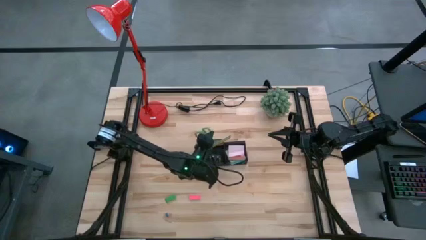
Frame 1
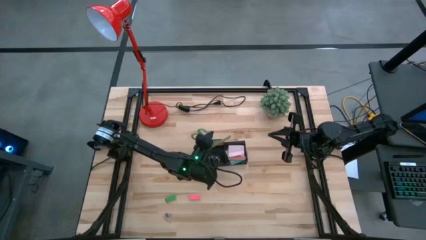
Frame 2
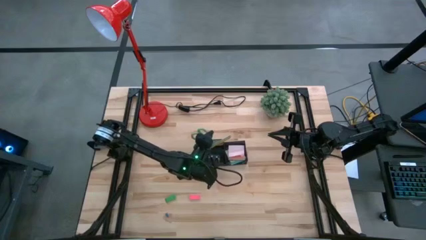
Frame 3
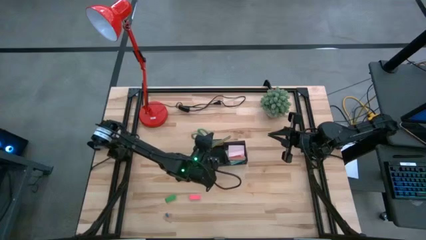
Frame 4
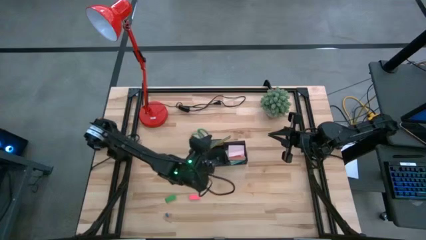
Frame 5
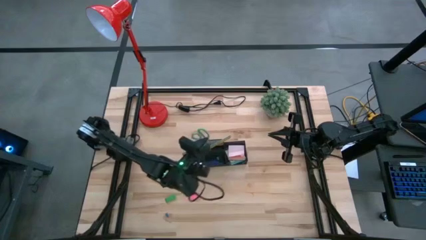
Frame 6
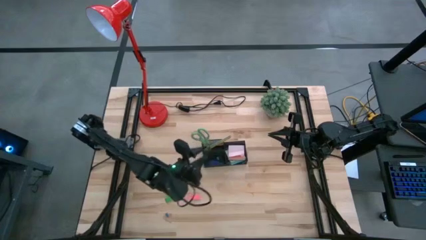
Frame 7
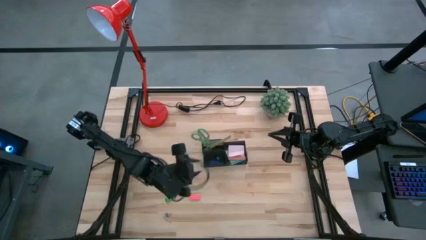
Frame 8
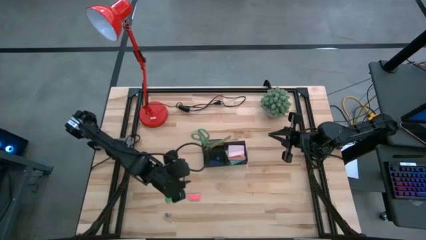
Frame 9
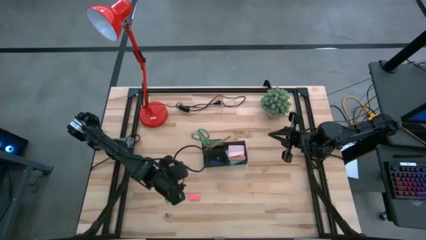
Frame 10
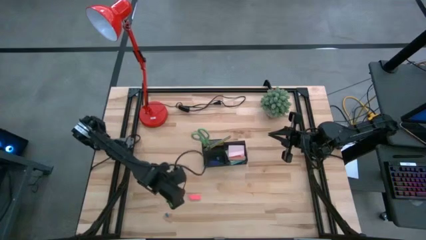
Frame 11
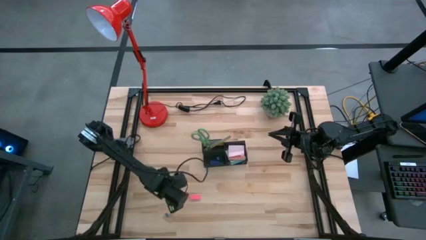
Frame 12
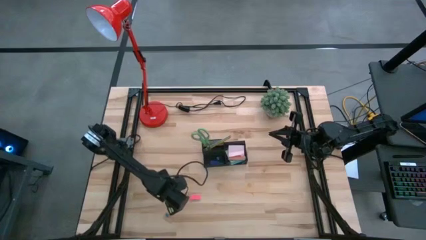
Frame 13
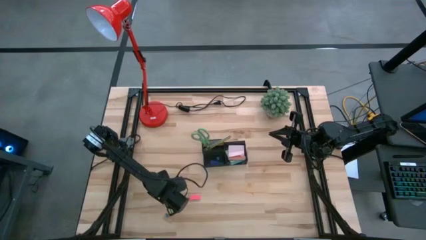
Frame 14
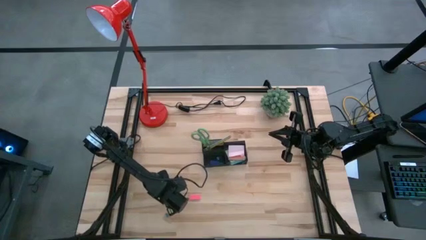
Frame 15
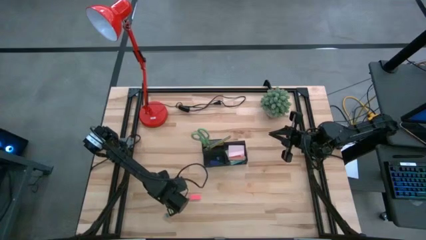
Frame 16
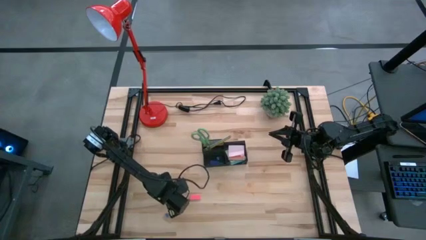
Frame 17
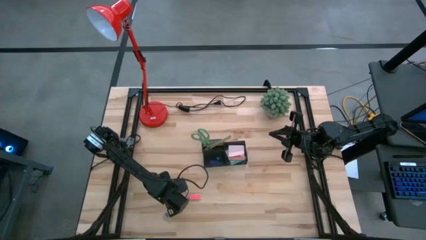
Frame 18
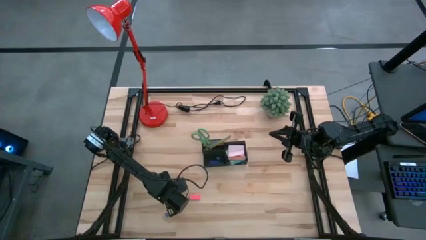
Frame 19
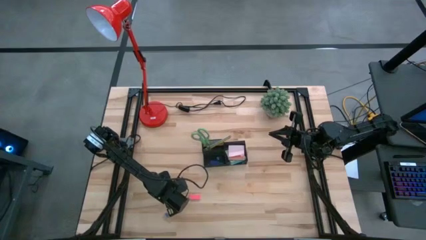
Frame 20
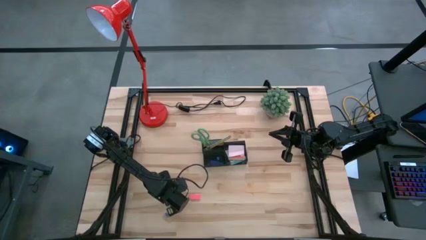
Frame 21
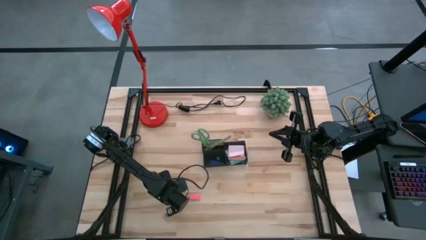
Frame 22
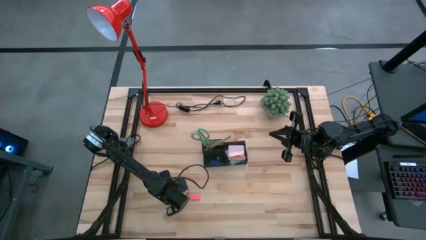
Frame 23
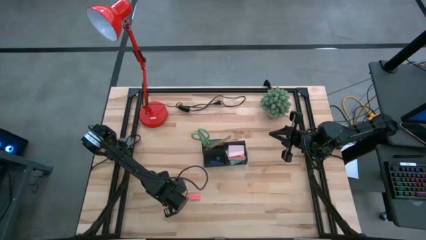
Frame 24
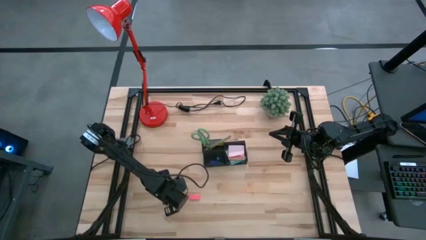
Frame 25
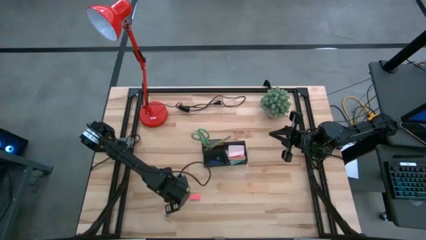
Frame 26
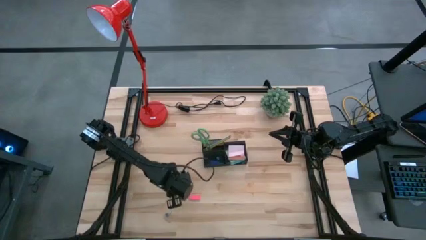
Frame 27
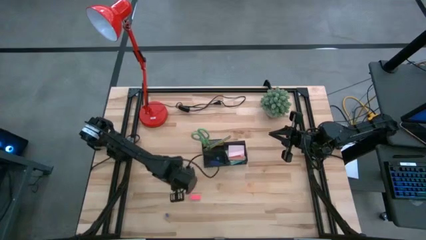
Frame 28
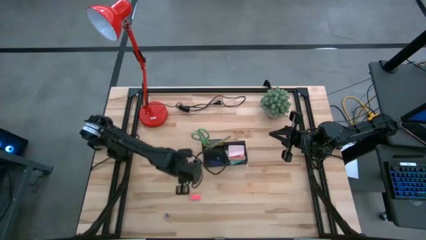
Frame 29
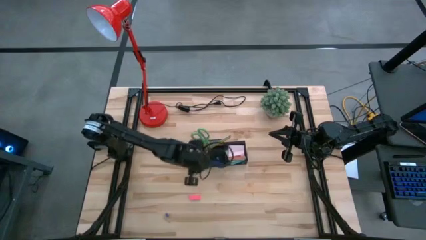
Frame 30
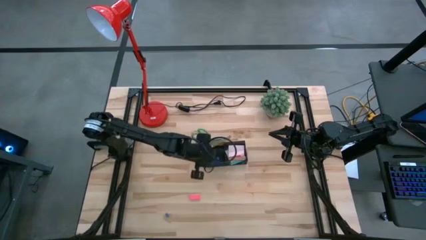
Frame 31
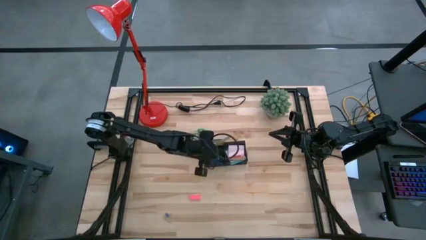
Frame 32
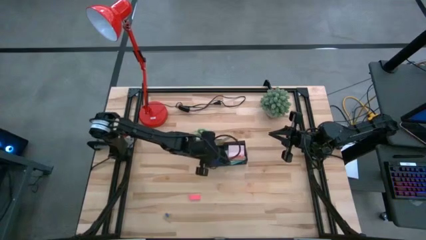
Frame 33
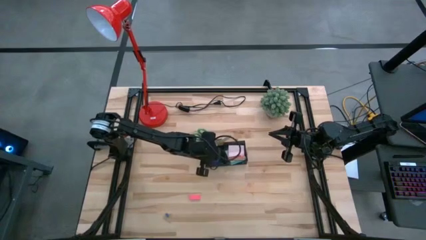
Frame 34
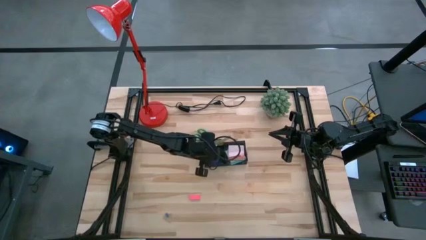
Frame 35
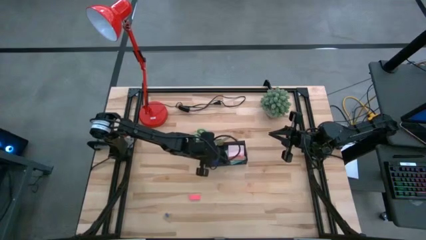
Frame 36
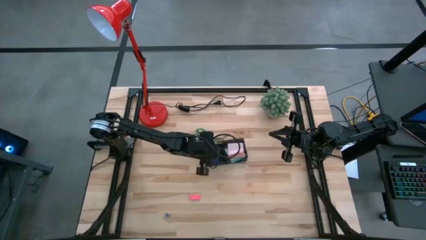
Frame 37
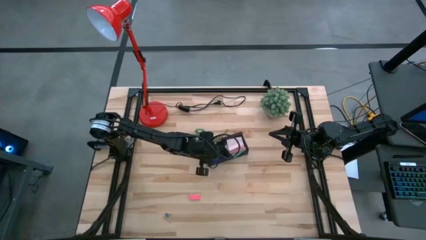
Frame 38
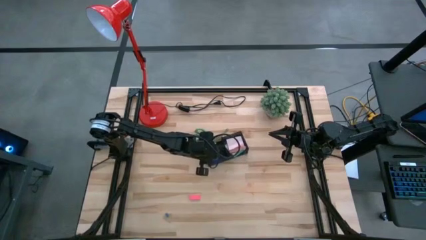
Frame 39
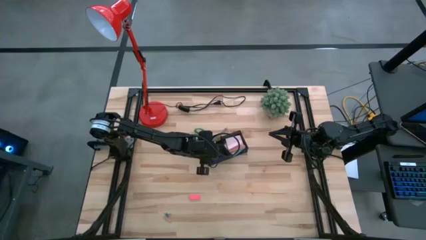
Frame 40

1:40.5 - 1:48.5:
Task: Pick and place office supplies into organizer
Put the green eraser into the black desk organizer

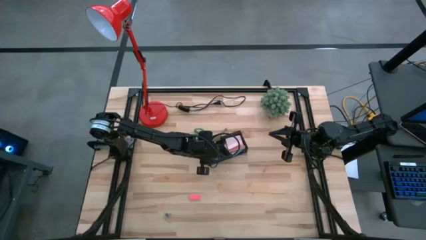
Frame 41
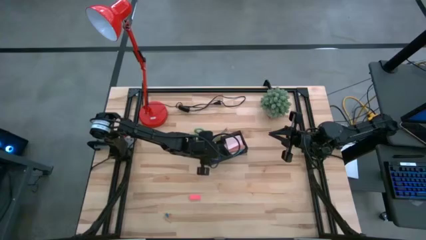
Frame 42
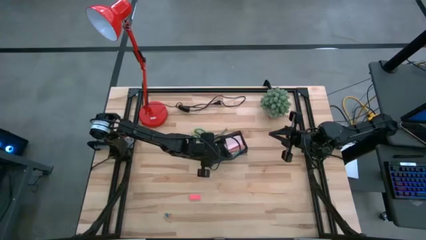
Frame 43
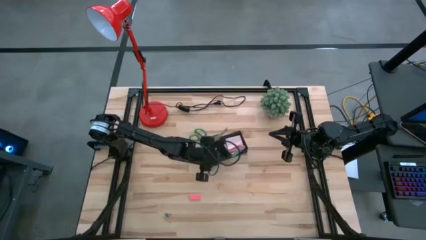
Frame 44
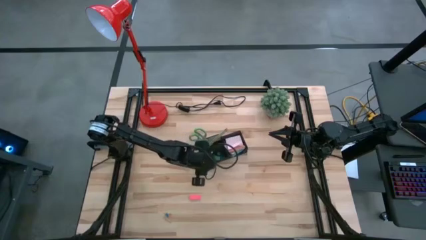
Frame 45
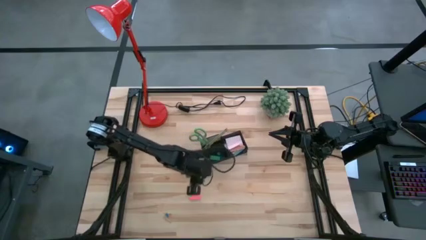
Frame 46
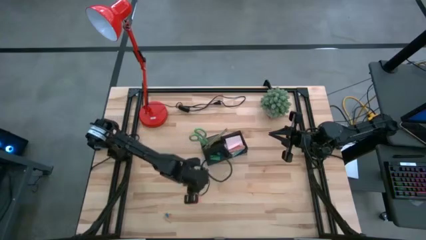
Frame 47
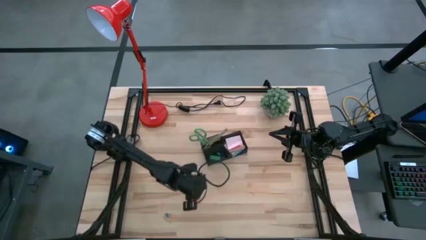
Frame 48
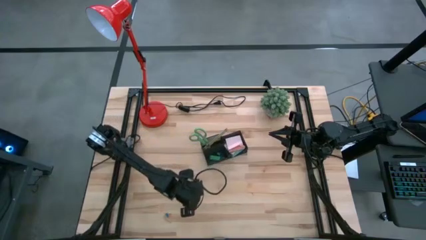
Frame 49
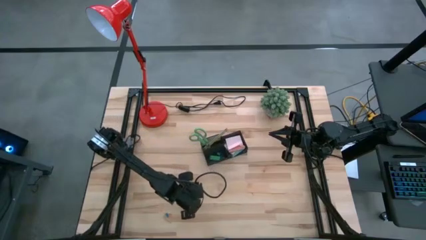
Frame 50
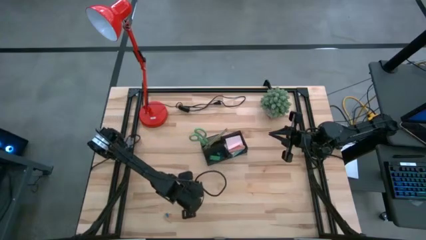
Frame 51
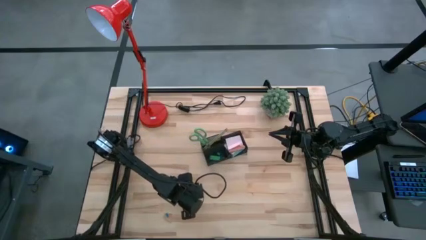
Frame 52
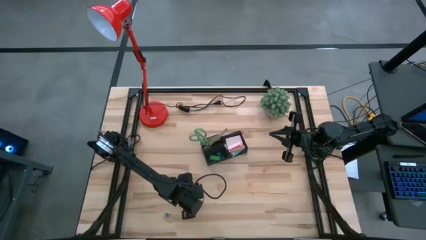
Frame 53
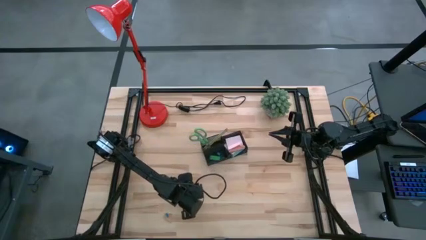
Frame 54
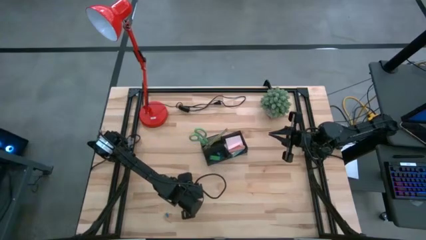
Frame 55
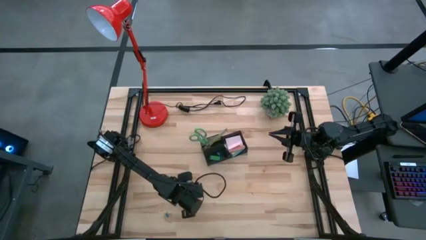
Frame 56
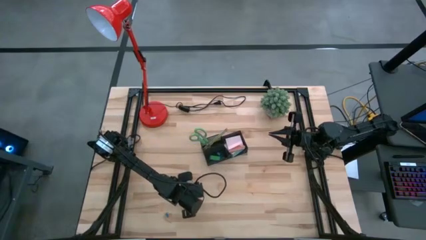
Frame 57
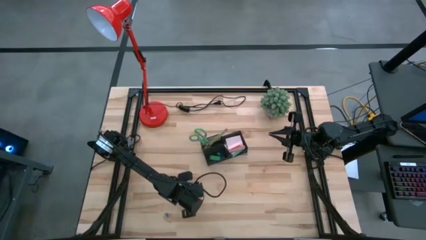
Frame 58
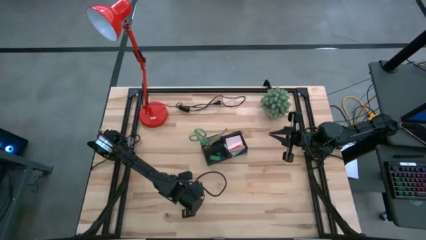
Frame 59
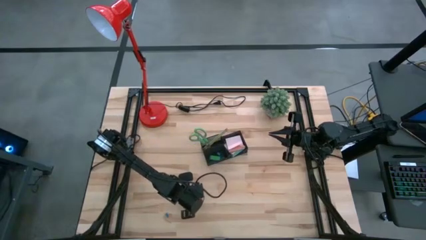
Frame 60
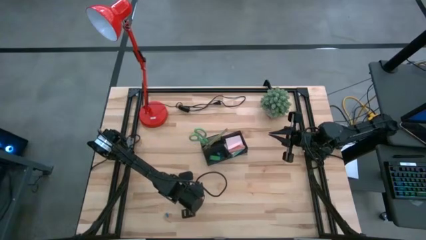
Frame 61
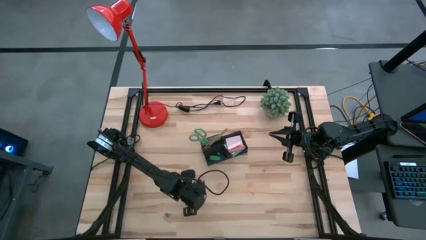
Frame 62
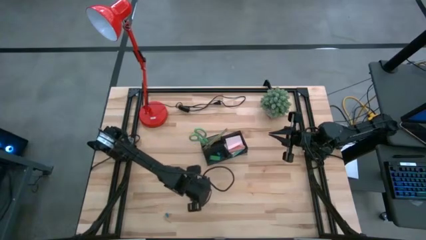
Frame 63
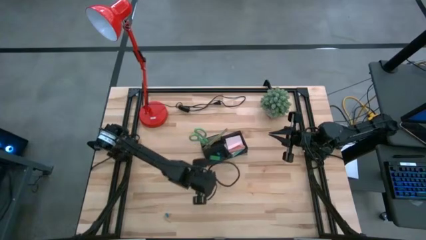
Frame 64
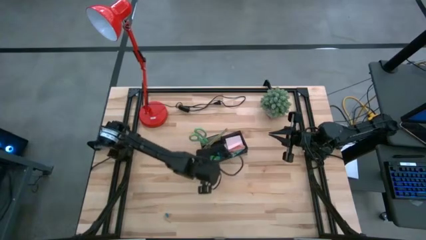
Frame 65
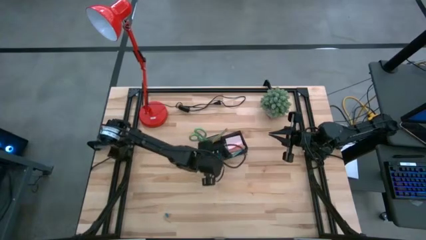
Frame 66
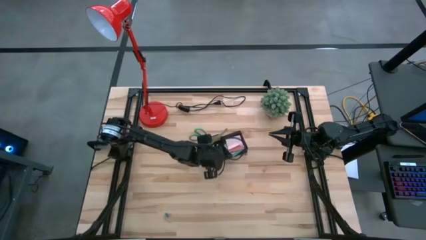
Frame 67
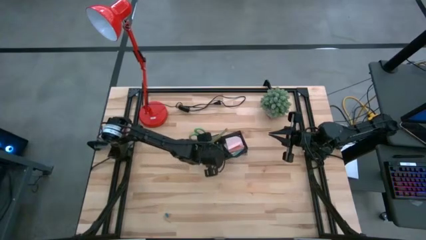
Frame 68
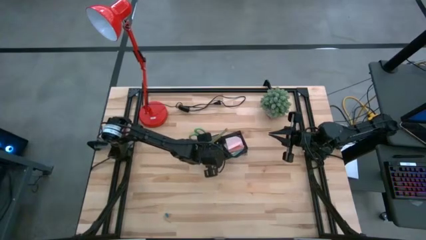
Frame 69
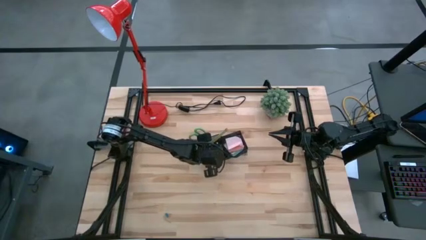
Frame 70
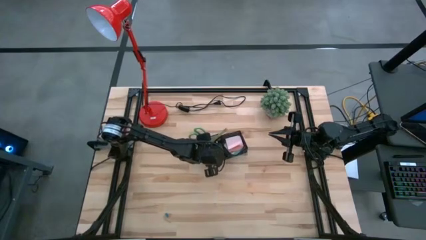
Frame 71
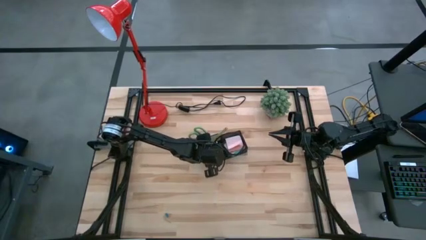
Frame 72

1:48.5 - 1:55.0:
Put the pink eraser into the black desk organizer
